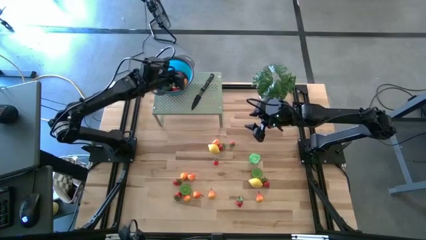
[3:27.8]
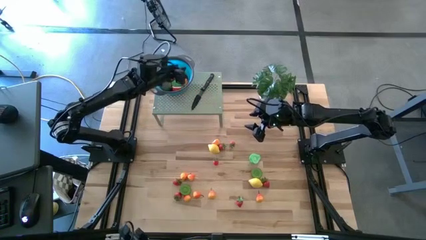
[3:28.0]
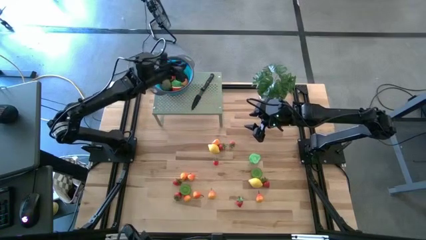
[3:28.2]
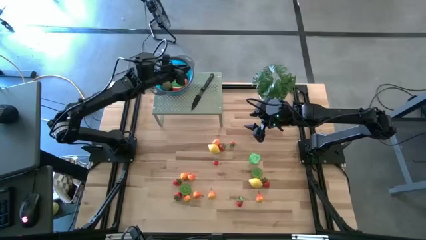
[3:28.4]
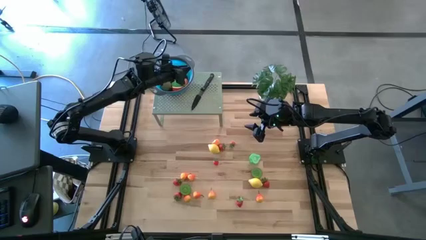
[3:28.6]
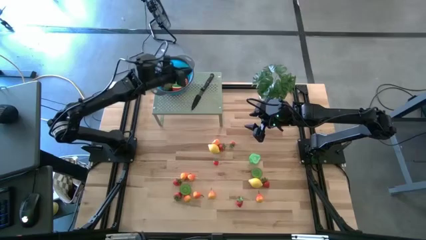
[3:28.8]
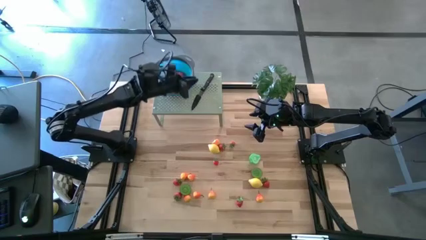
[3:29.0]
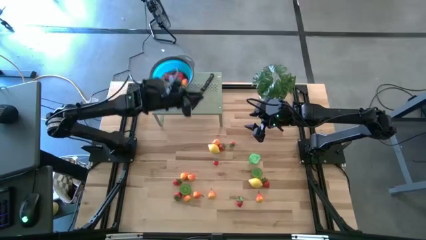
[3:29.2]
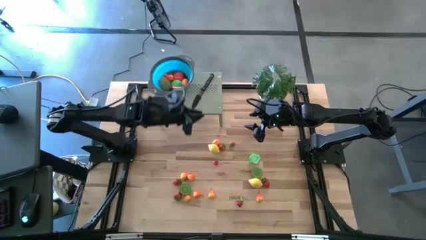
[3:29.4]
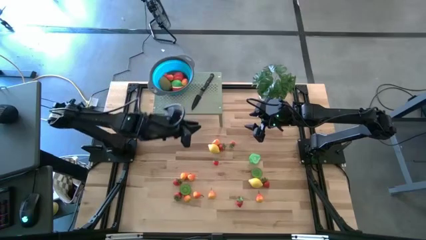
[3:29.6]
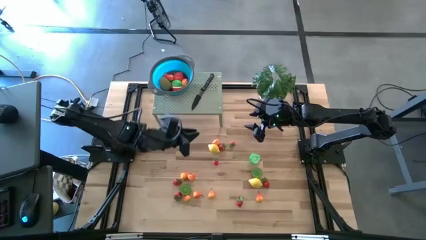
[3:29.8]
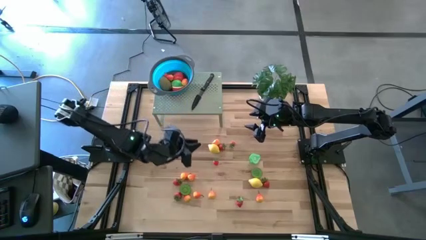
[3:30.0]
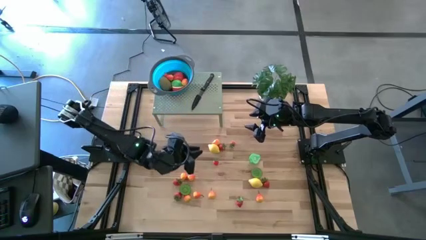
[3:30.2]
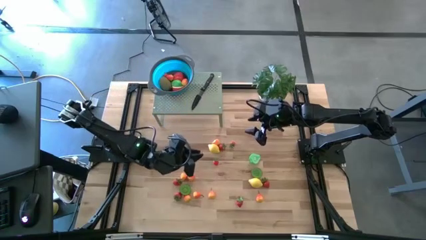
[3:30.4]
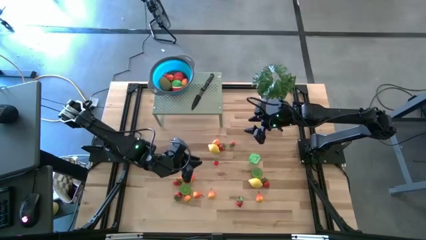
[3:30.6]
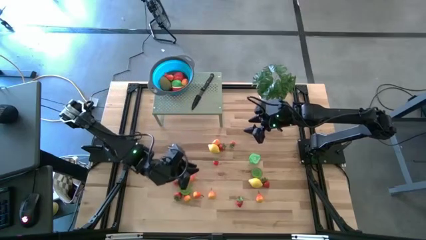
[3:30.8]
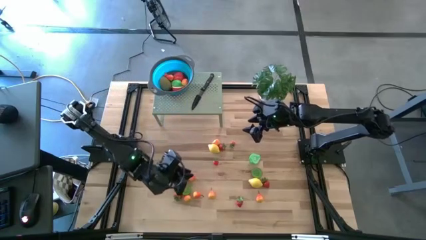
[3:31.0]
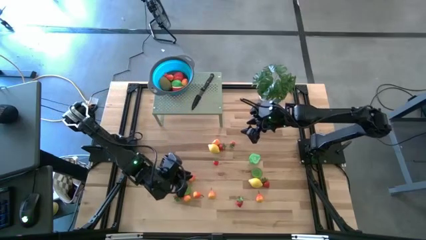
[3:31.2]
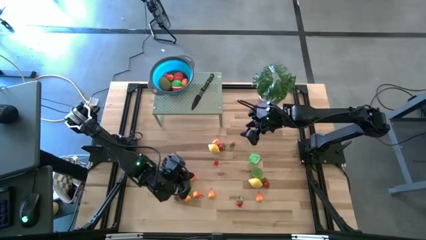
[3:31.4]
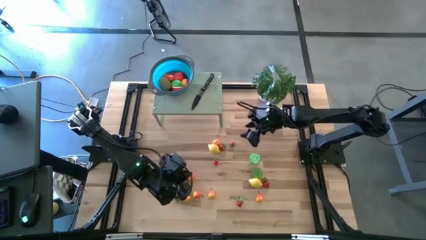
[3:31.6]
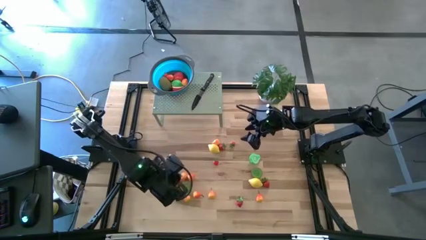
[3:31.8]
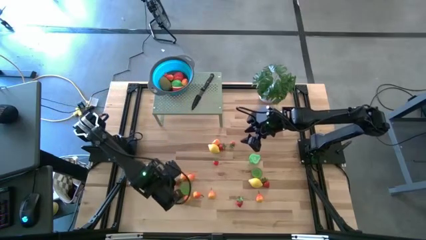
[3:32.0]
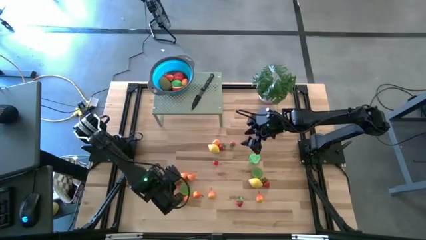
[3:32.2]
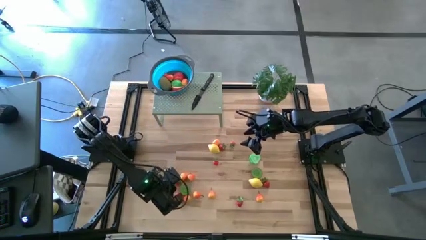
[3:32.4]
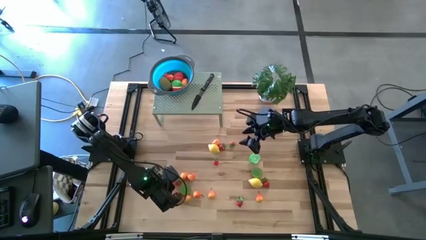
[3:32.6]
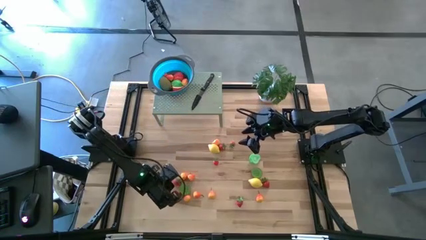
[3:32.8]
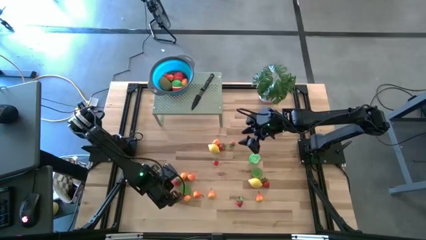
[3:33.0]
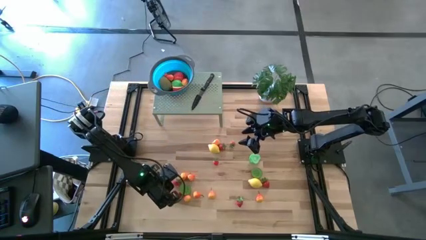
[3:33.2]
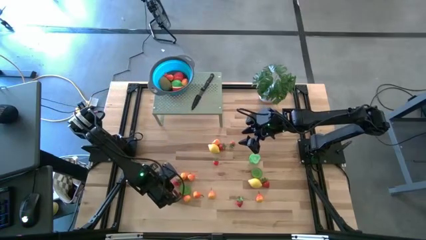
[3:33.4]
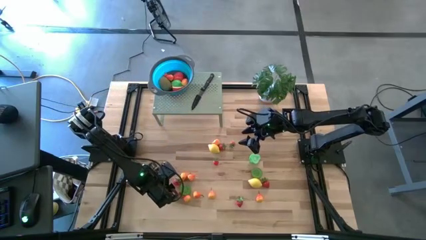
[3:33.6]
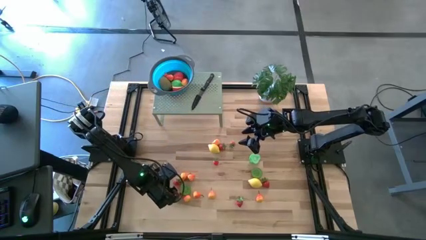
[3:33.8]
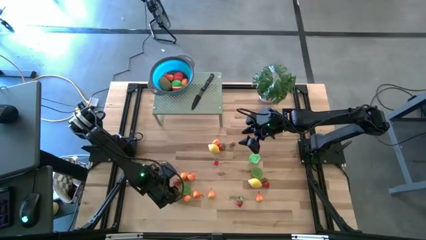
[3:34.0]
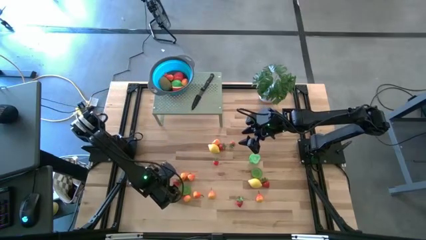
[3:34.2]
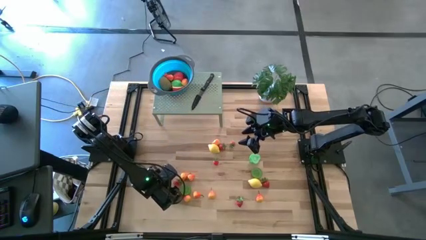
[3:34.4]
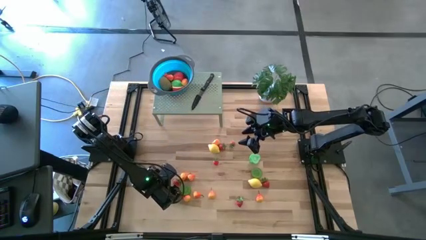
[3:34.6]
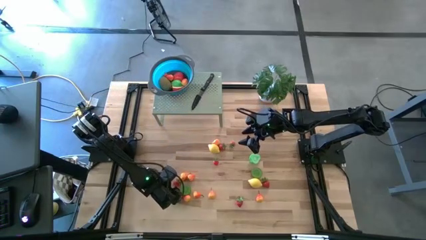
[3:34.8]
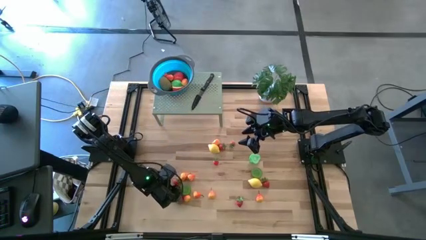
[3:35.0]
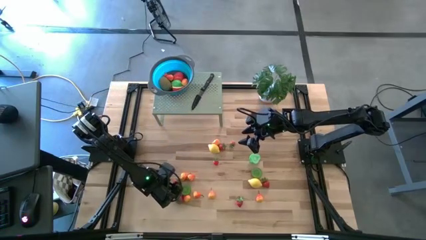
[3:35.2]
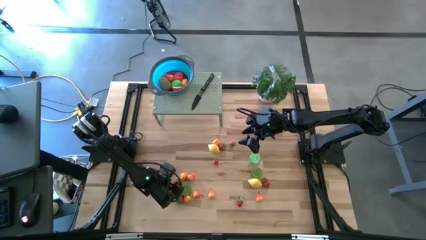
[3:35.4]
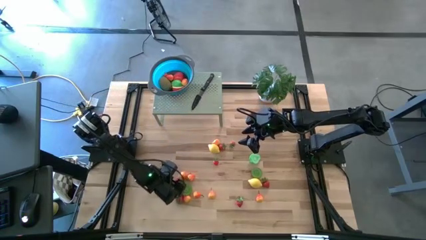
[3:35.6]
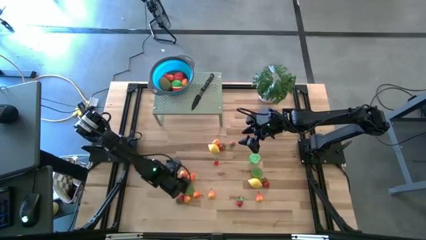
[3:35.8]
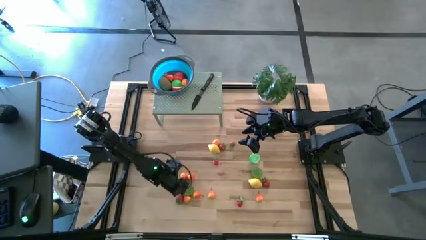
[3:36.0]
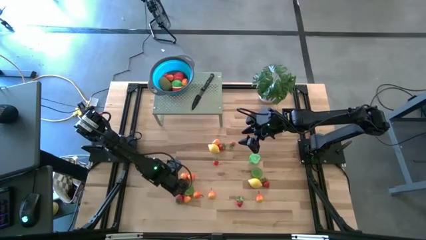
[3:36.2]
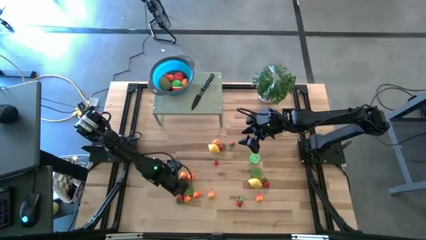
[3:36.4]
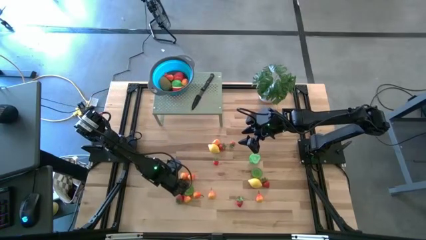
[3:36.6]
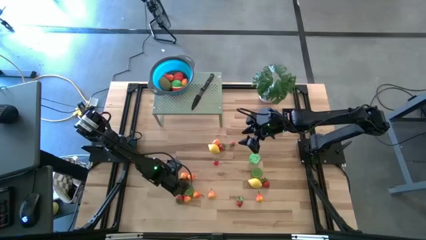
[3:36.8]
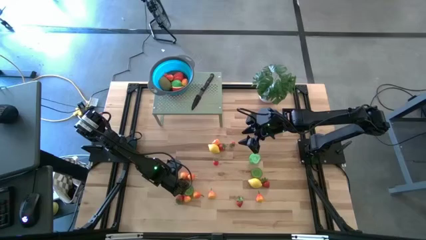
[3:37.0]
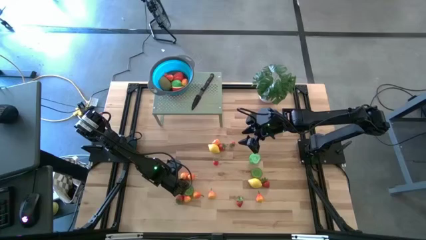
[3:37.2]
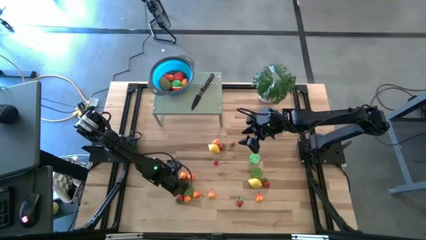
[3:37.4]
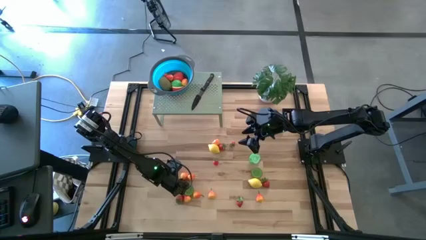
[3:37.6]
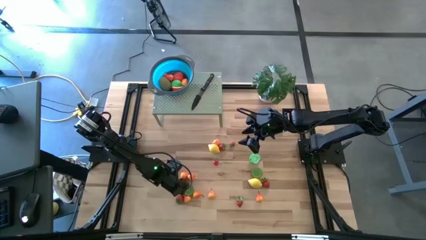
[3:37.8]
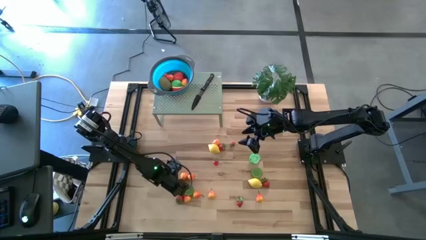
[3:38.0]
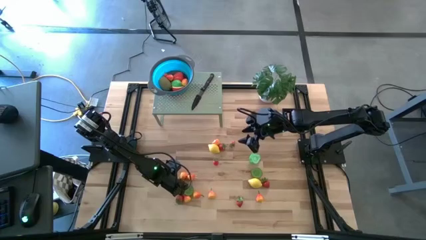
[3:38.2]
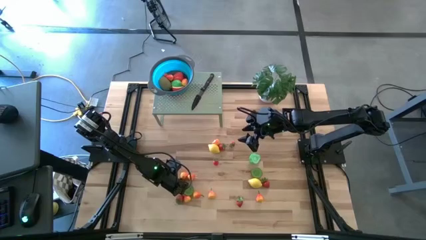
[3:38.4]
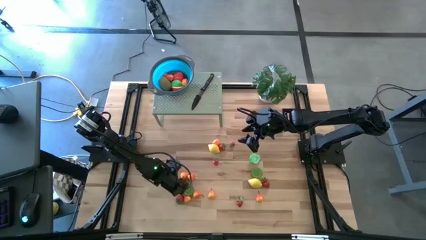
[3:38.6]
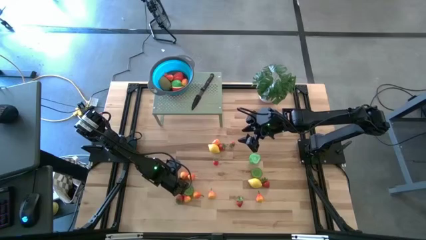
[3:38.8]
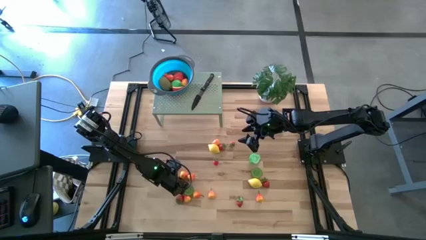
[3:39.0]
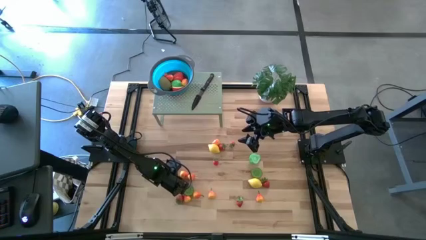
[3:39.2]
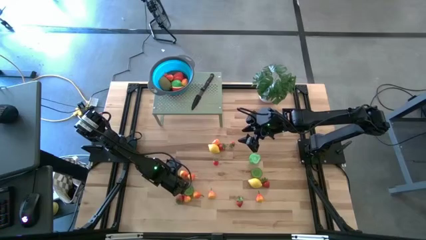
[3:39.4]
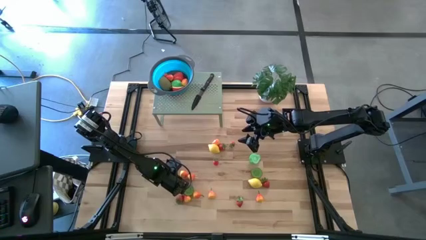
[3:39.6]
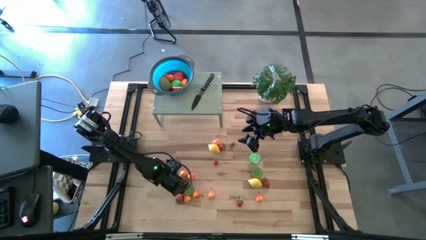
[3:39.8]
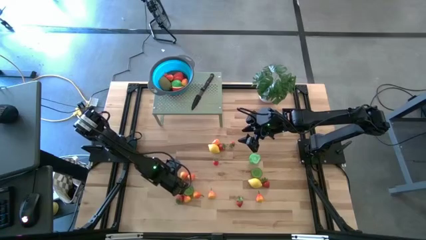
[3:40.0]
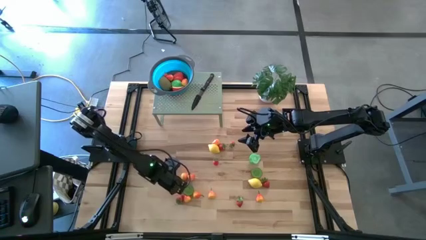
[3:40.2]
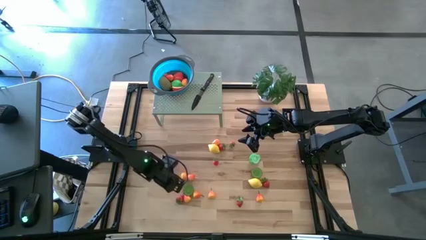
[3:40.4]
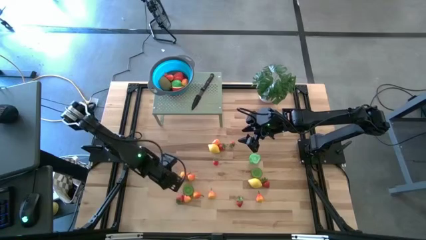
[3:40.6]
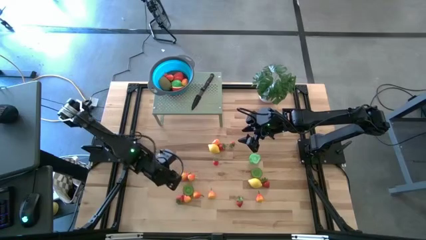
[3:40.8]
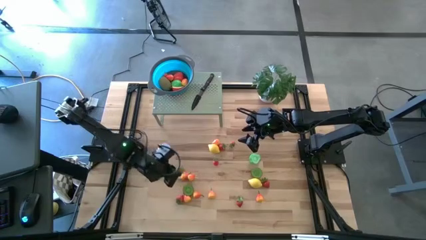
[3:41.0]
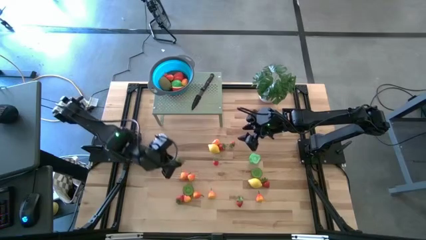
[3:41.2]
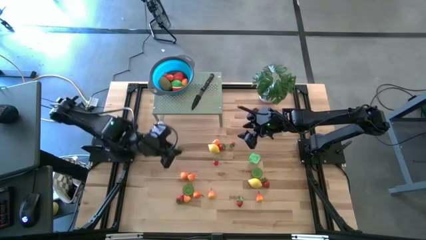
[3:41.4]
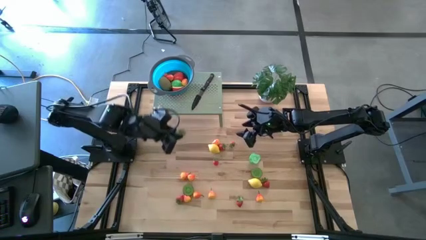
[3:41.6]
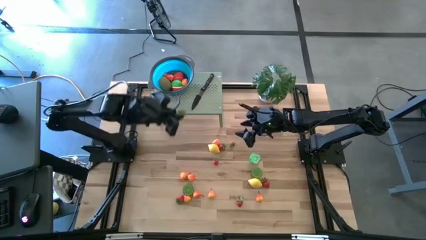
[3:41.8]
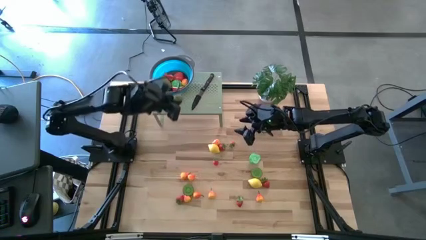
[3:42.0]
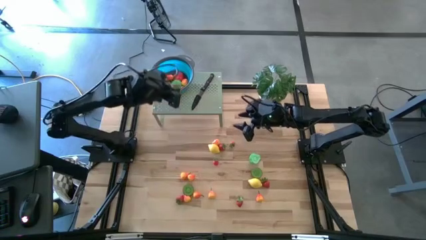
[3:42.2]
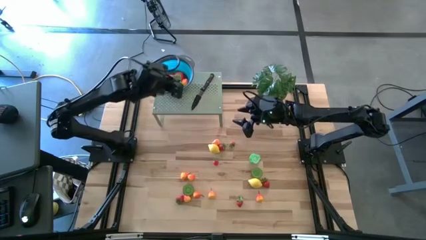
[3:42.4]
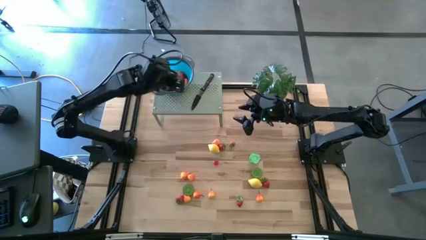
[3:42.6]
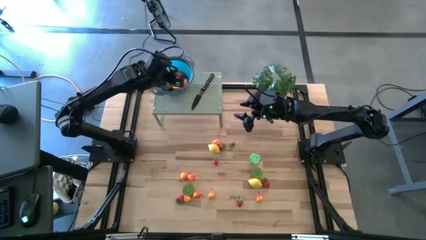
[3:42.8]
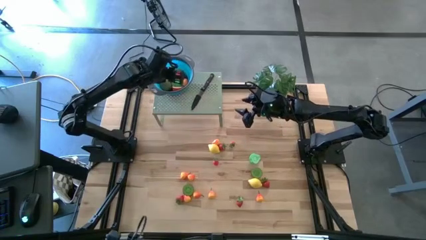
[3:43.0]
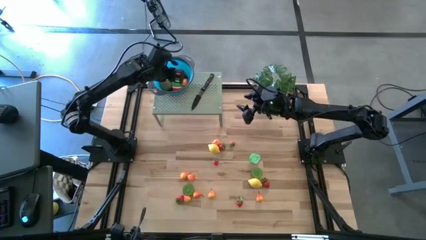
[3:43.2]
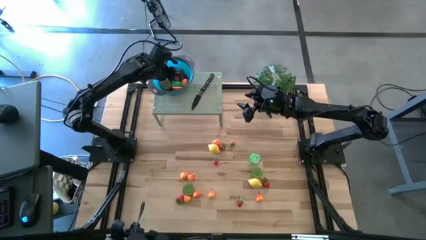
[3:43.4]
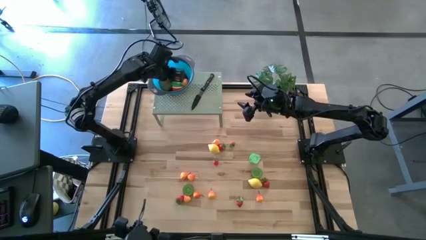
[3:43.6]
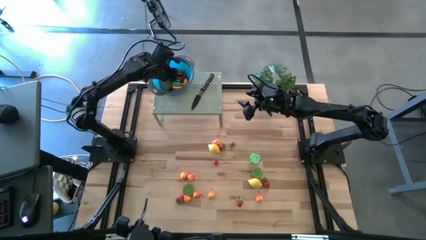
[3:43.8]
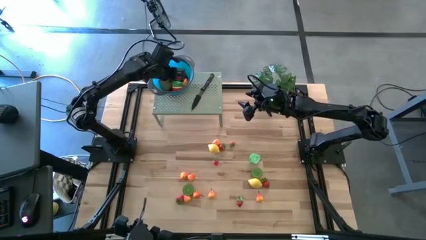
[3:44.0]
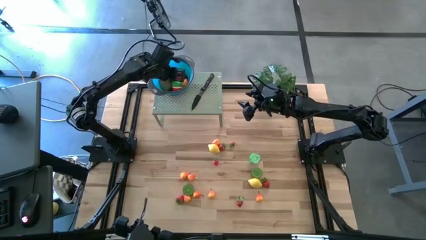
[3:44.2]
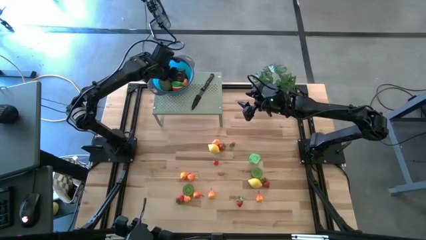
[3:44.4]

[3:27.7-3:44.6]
Task: Pick & Place Fruit
Put the strawberry into the strainer bowl on the shelf
